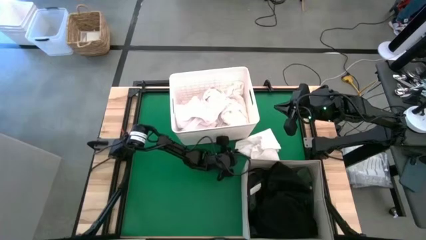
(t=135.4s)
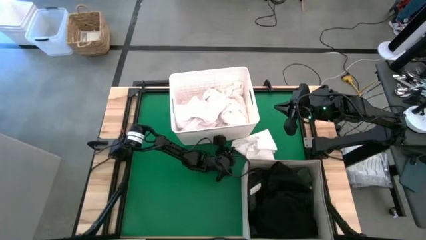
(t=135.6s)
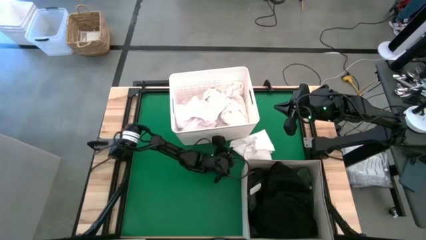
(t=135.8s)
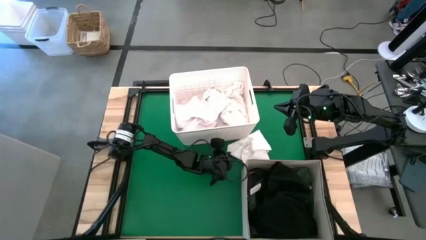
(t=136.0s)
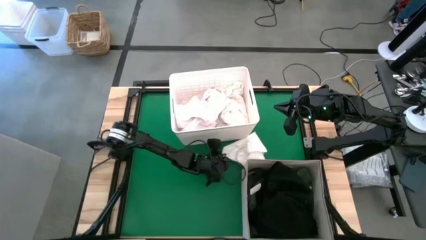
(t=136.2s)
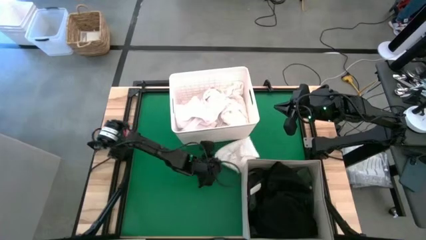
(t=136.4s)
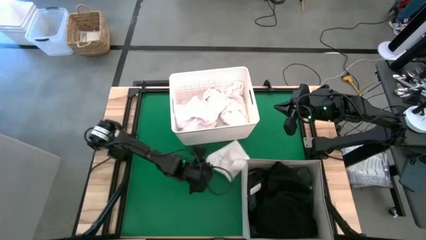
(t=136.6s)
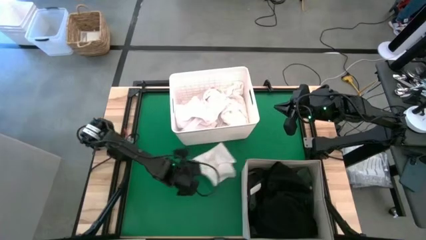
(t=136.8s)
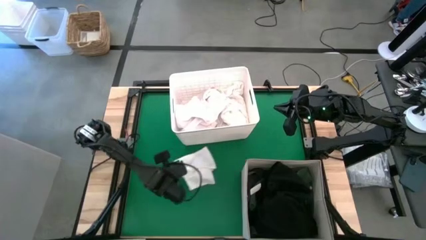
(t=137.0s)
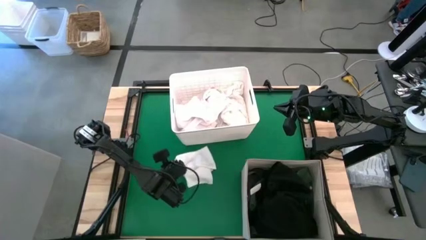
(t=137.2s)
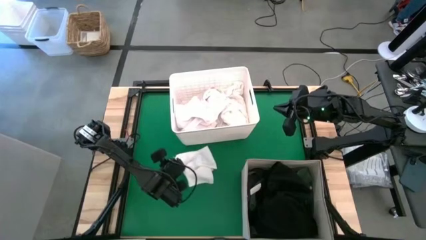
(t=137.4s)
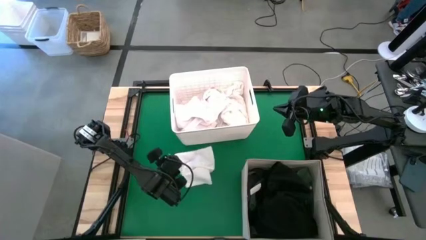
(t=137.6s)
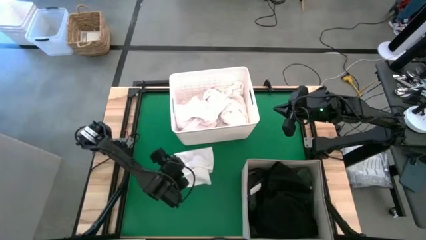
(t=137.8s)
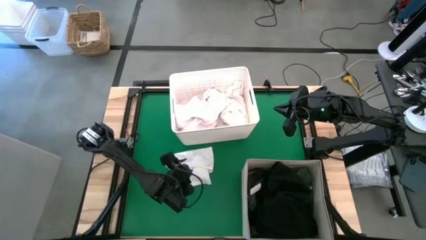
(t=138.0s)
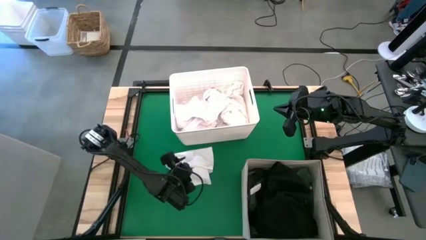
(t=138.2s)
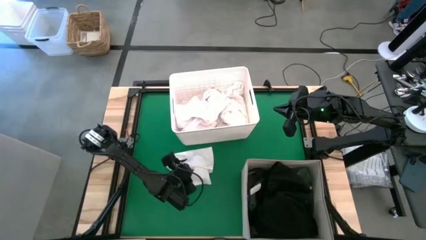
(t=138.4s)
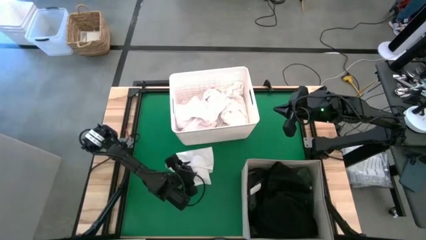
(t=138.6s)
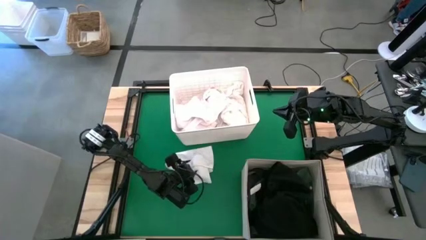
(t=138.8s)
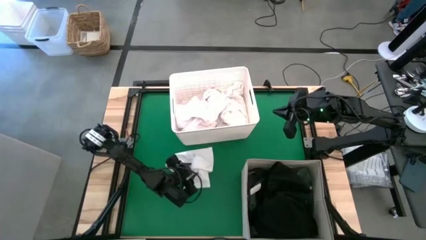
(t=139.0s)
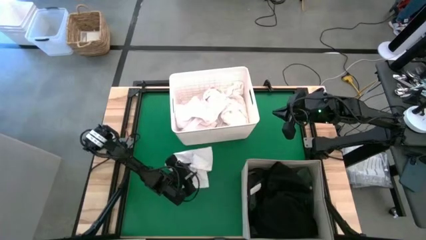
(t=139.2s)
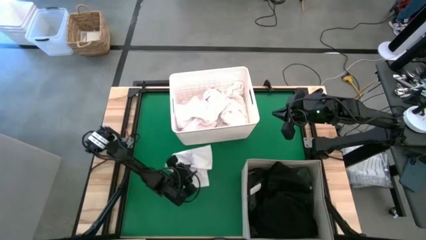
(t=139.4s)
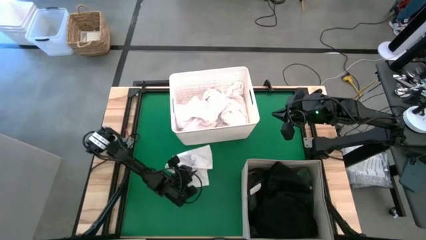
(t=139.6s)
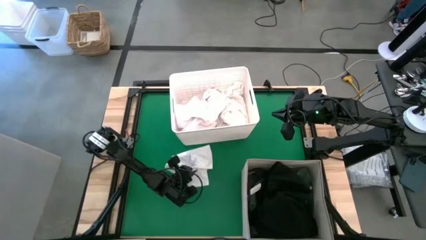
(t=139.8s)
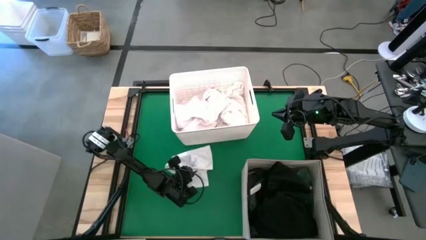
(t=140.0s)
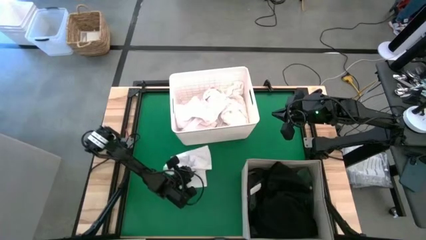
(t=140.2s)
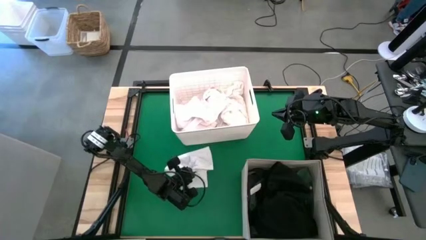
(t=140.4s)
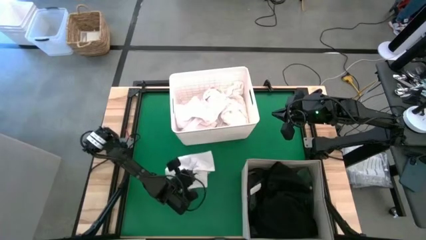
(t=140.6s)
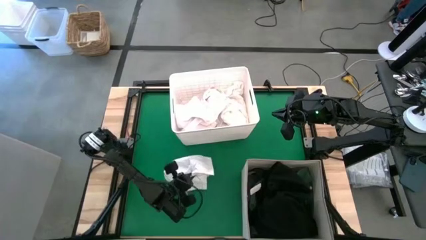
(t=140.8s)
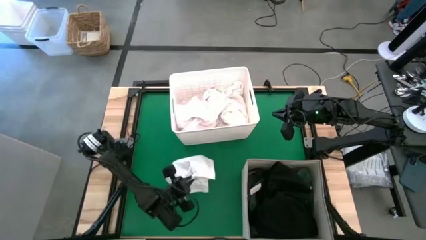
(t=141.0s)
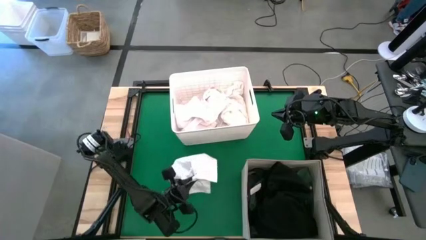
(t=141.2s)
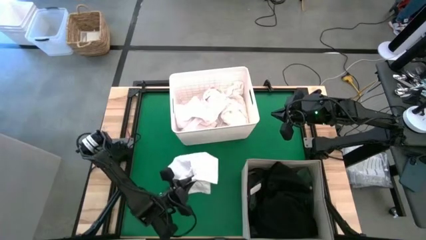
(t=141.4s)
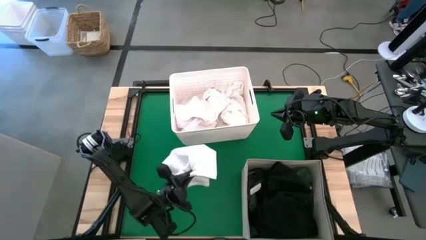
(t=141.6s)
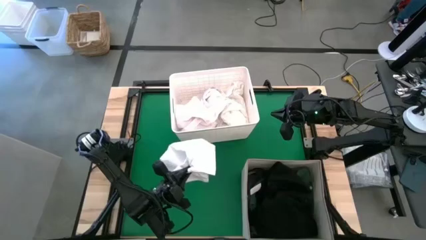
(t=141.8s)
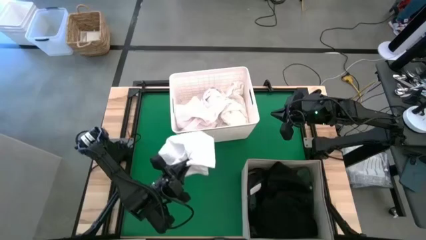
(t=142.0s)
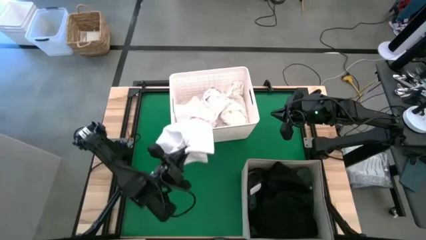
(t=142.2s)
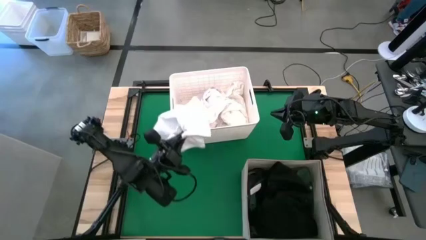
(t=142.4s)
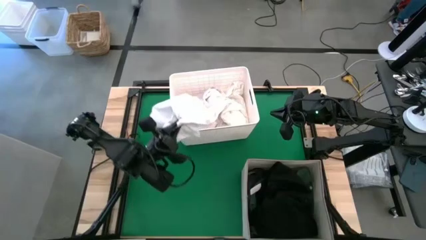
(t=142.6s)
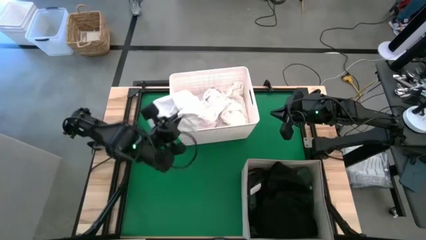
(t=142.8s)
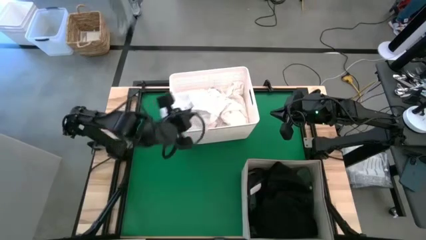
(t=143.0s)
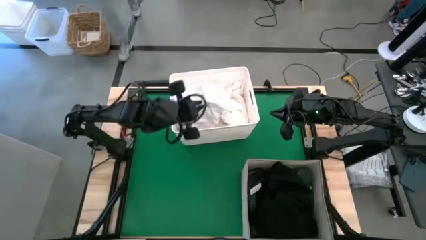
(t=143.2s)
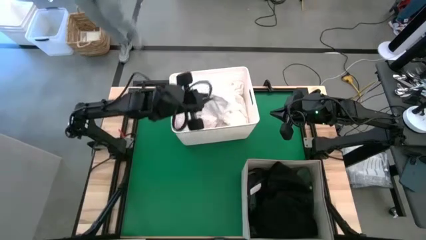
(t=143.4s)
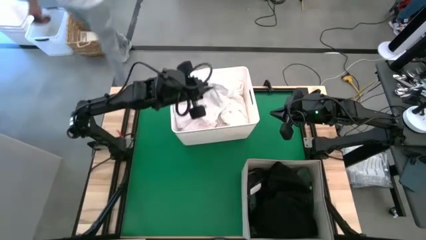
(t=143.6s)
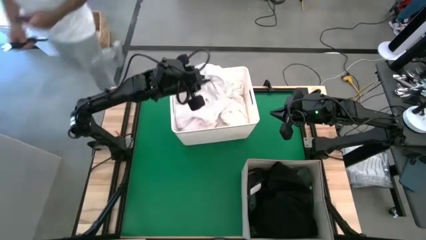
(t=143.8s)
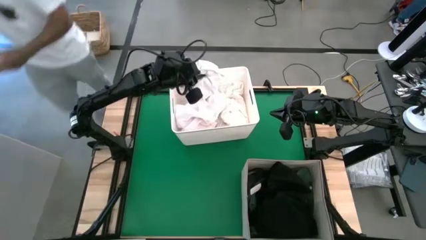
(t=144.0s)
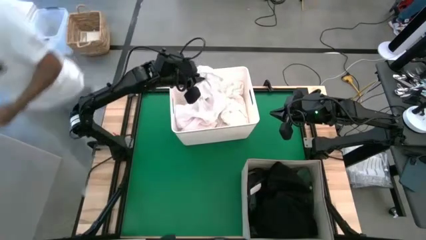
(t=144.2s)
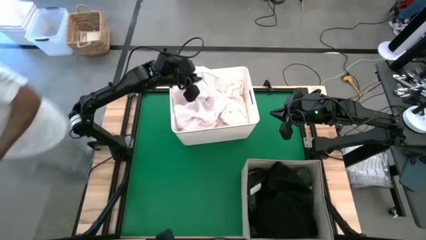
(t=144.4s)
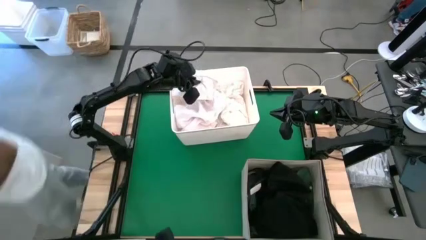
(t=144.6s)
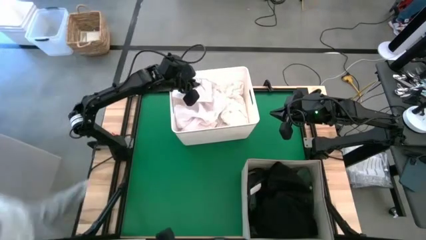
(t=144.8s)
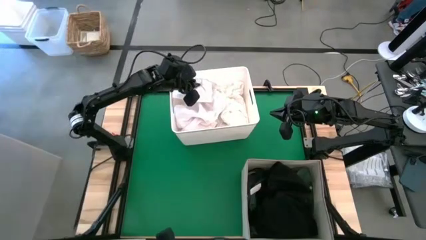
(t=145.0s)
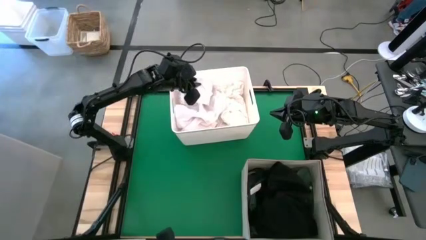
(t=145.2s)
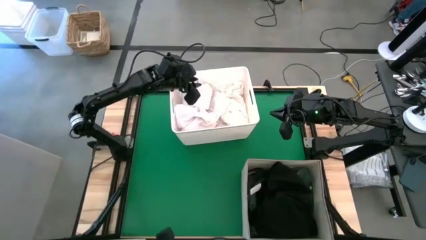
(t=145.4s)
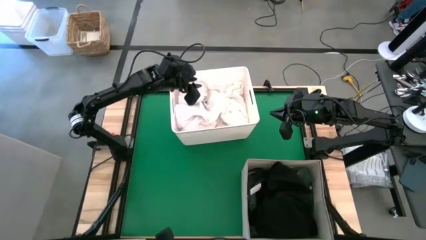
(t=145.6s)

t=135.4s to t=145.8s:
Put the white cloth into the white plastic storage bin
